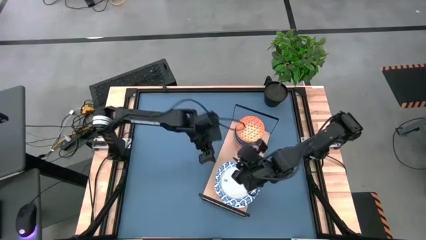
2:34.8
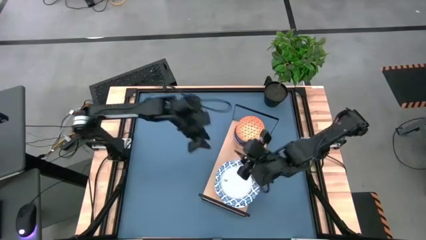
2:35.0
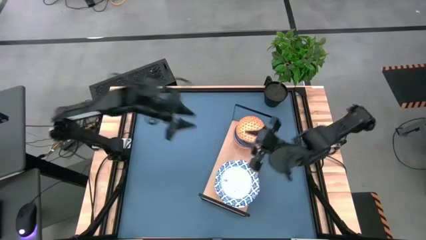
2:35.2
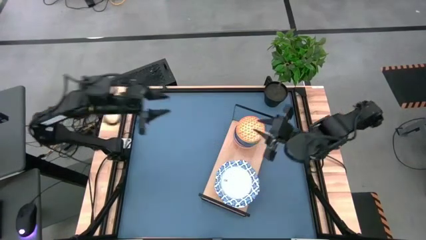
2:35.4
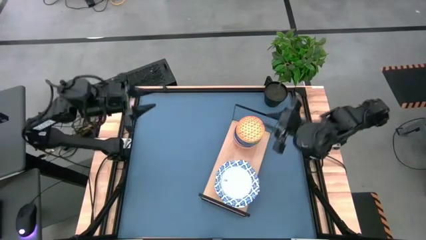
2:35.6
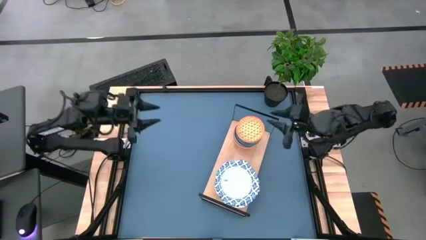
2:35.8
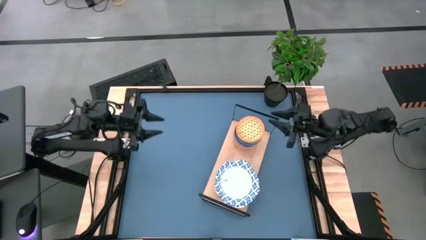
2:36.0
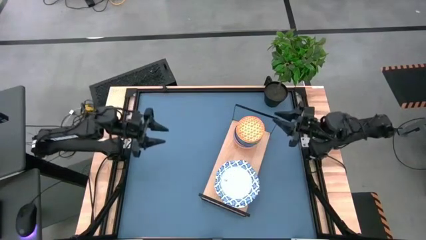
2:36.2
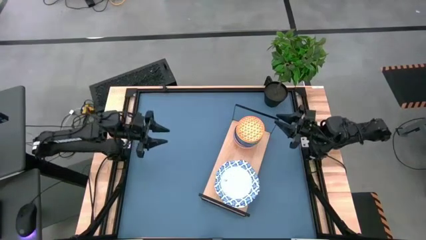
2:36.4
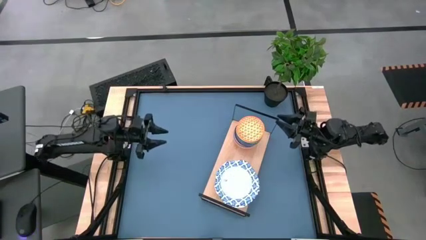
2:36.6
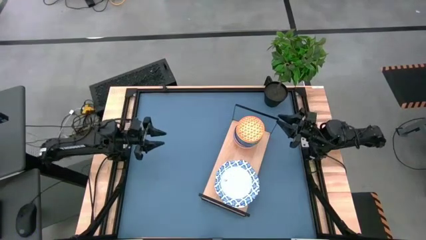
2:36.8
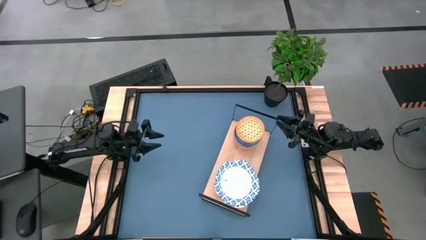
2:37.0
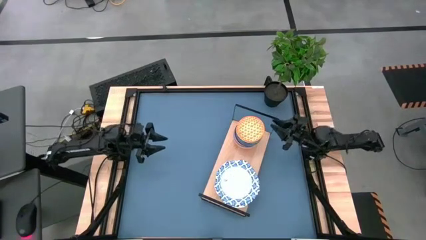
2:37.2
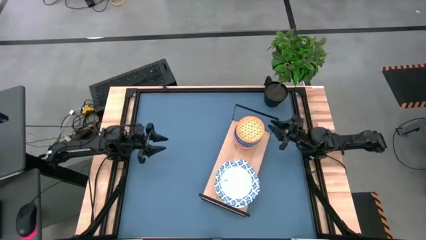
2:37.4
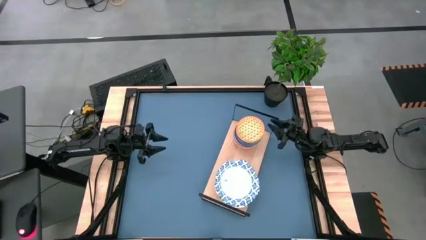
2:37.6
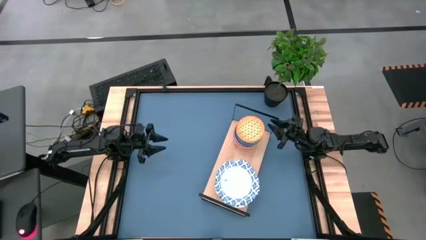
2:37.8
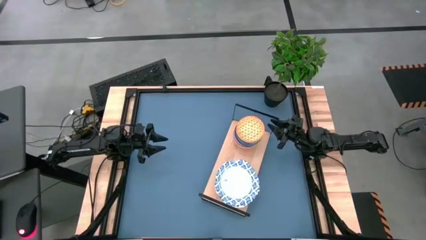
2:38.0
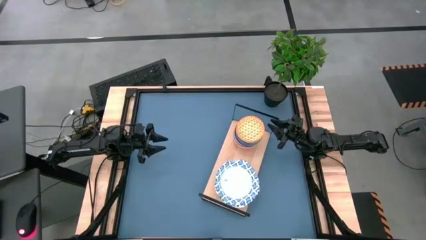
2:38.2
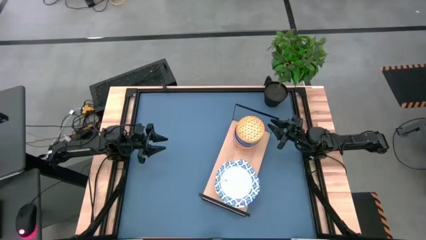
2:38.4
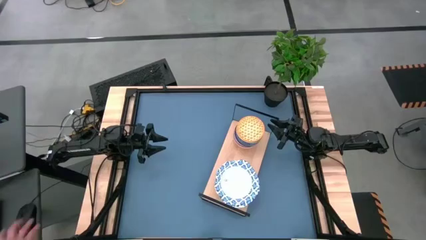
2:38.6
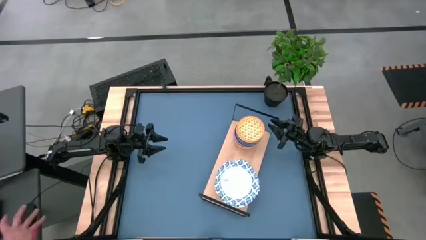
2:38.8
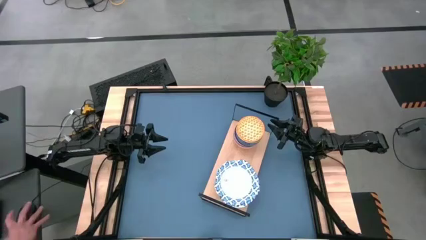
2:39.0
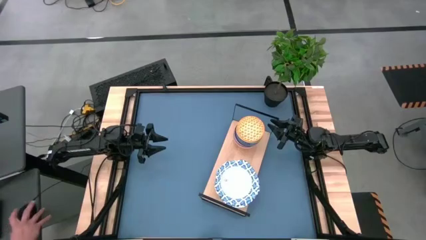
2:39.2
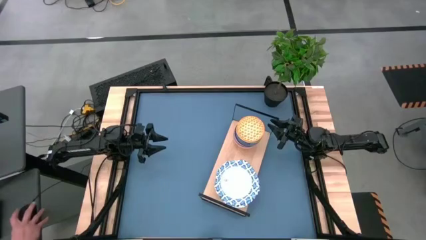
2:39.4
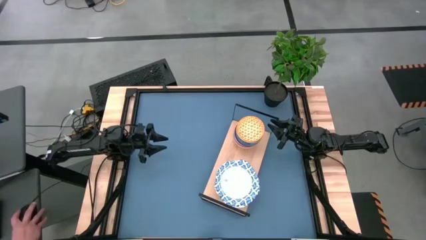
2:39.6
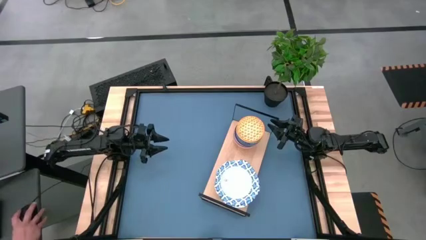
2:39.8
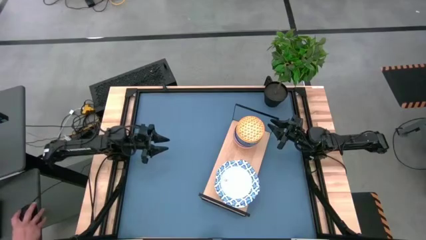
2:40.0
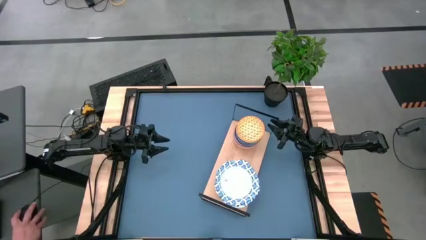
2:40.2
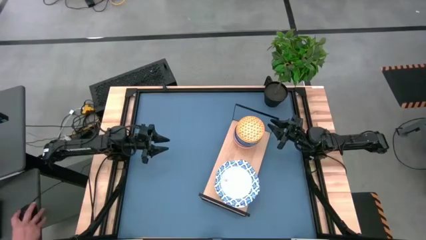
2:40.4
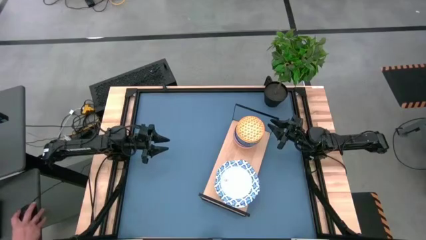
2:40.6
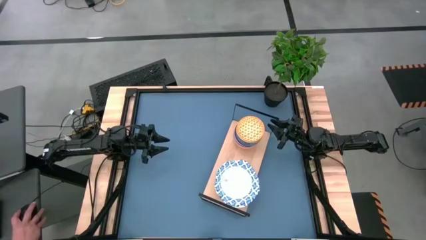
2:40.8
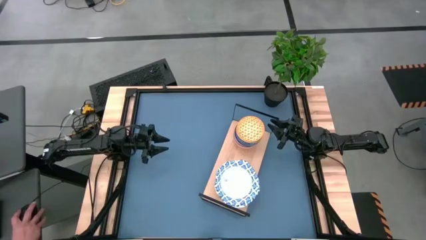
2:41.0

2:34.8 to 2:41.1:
Task: Place and stack bowls onto a shelf
Return to Home Position

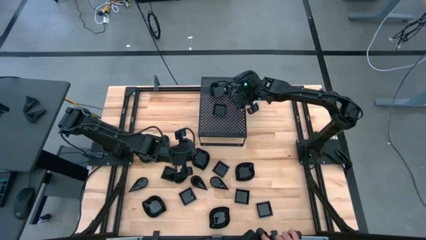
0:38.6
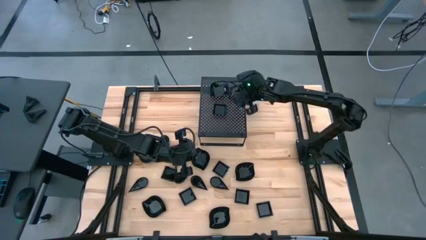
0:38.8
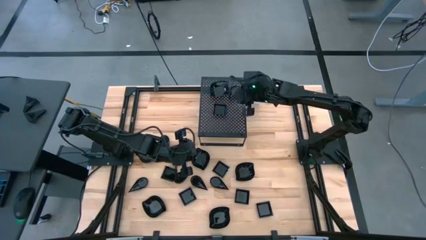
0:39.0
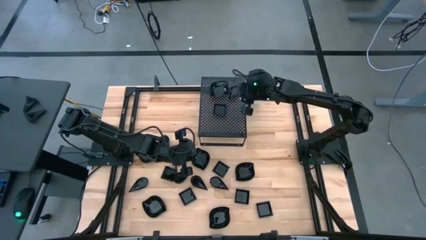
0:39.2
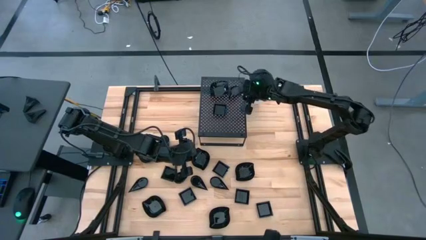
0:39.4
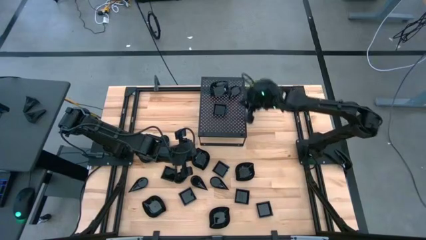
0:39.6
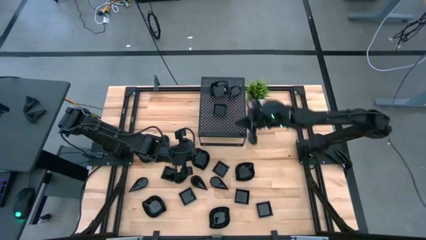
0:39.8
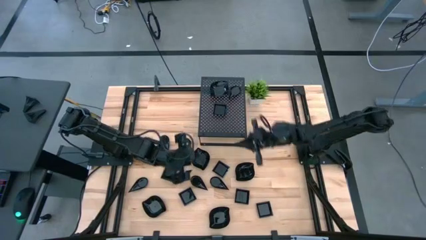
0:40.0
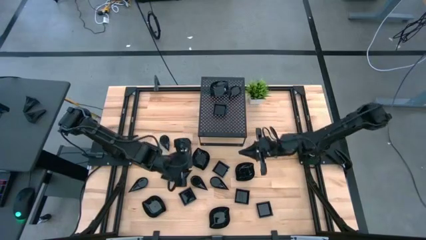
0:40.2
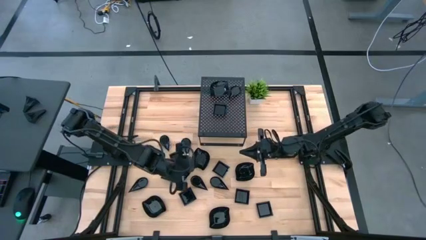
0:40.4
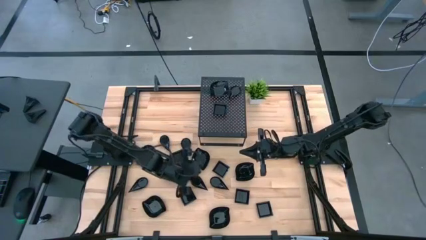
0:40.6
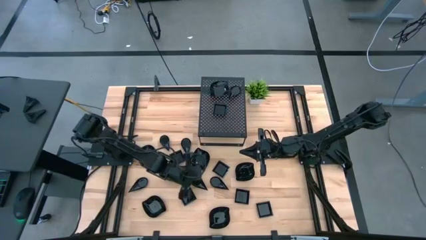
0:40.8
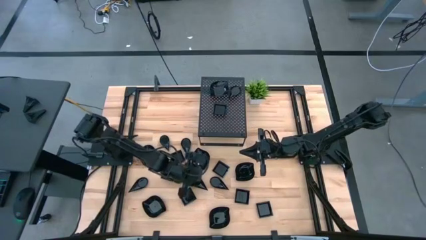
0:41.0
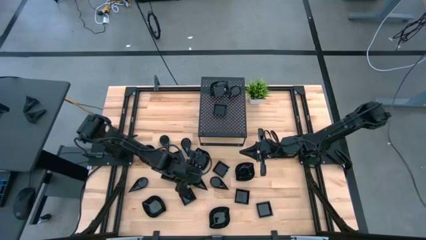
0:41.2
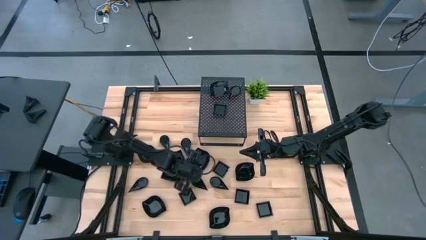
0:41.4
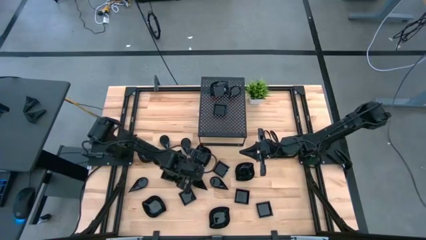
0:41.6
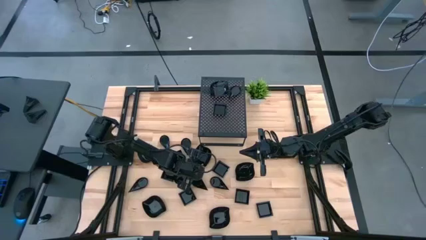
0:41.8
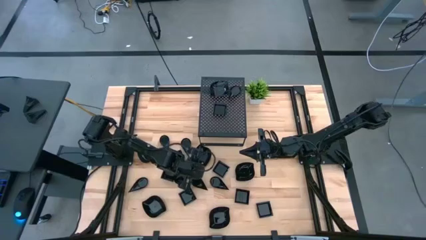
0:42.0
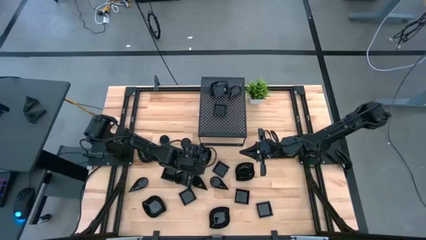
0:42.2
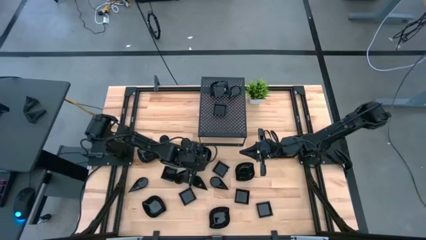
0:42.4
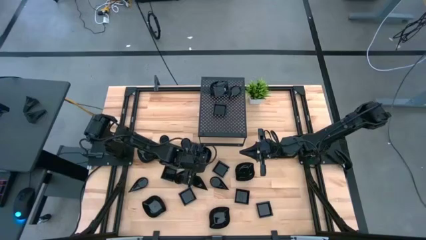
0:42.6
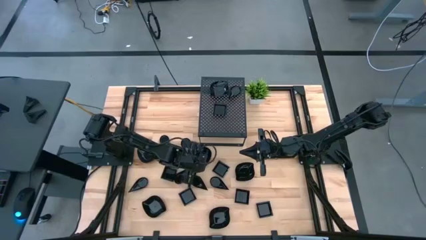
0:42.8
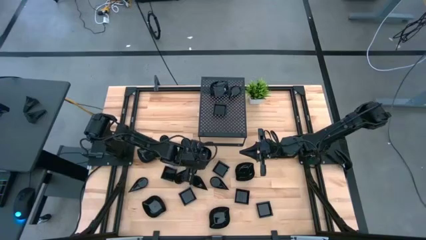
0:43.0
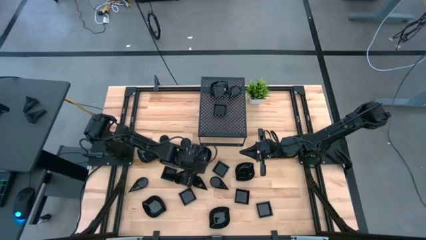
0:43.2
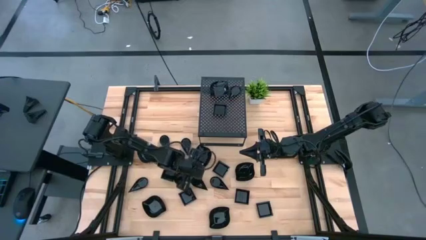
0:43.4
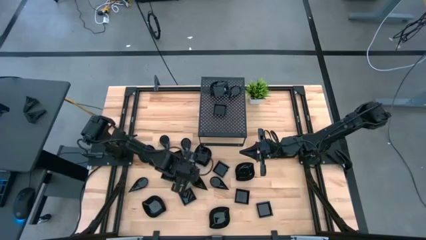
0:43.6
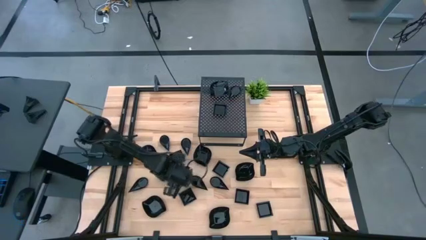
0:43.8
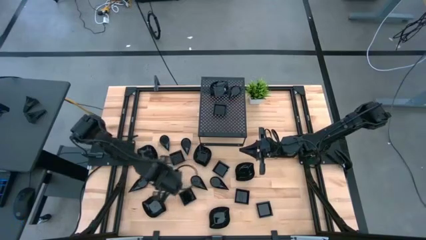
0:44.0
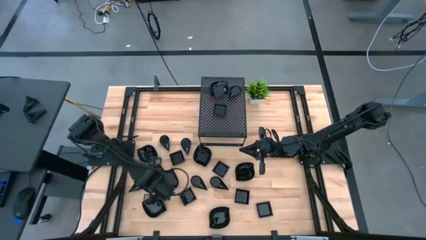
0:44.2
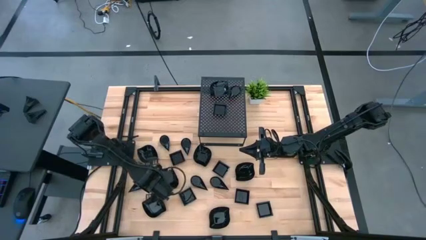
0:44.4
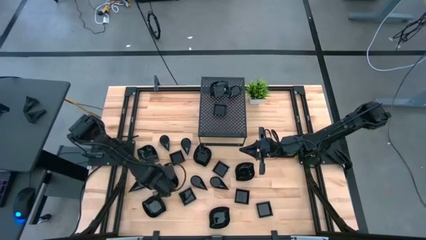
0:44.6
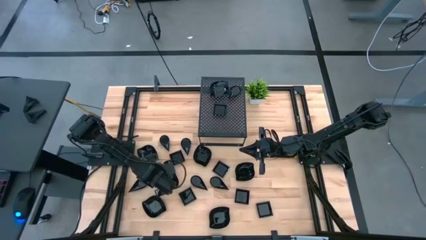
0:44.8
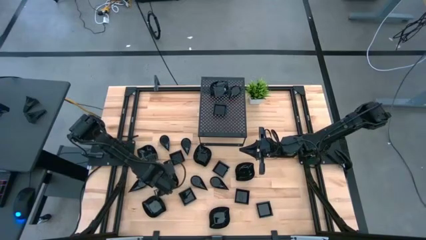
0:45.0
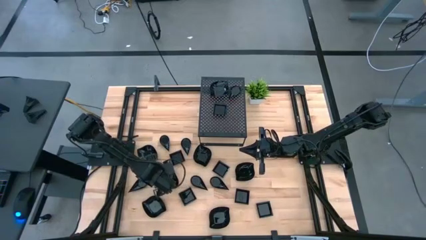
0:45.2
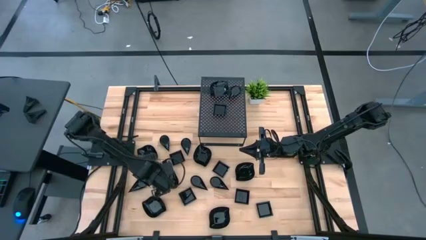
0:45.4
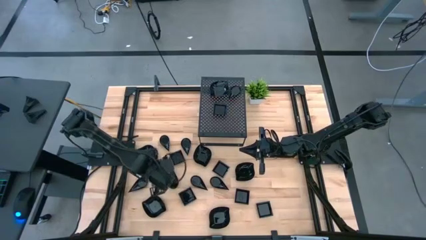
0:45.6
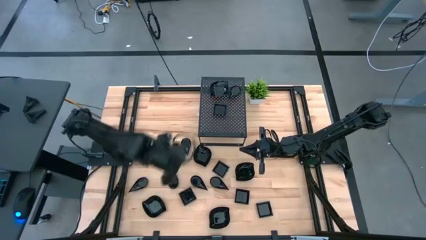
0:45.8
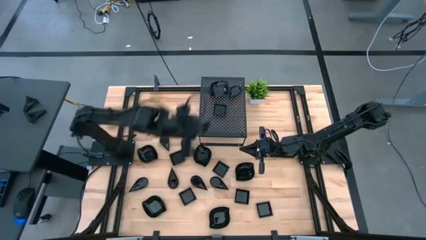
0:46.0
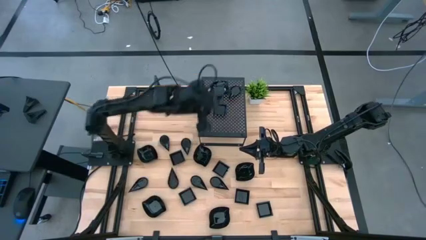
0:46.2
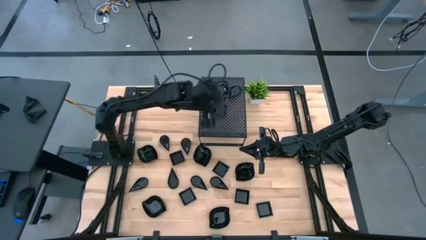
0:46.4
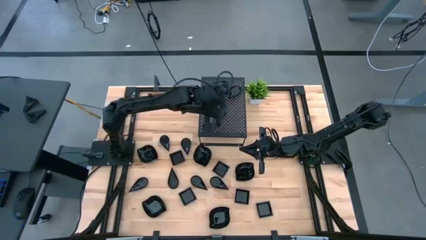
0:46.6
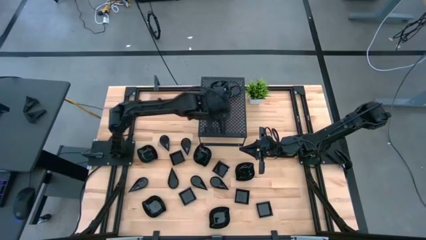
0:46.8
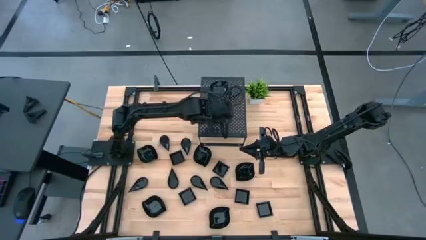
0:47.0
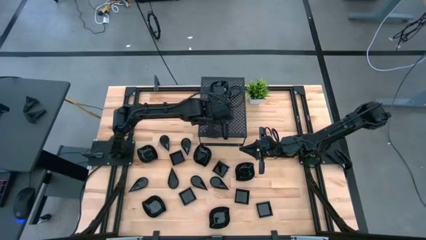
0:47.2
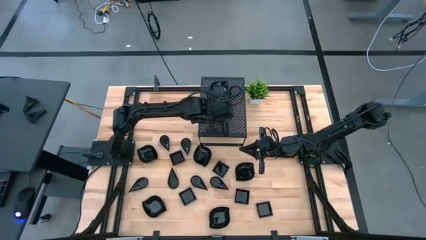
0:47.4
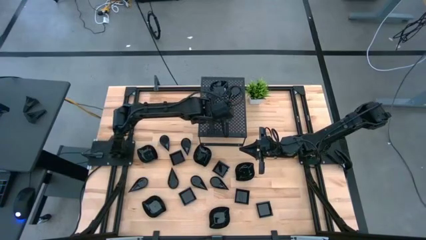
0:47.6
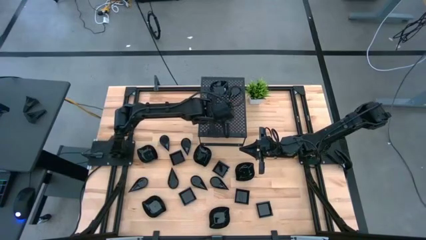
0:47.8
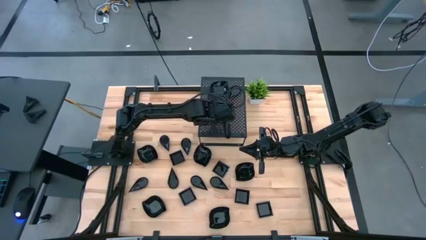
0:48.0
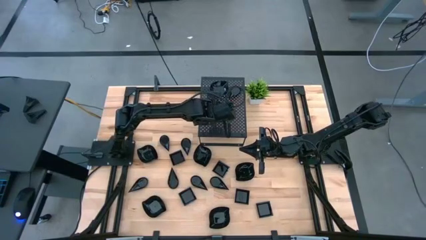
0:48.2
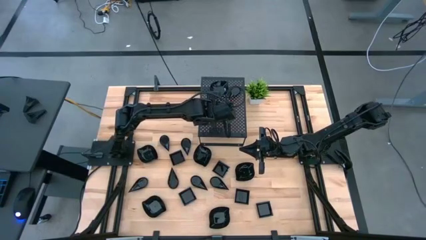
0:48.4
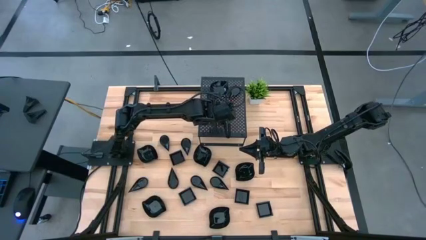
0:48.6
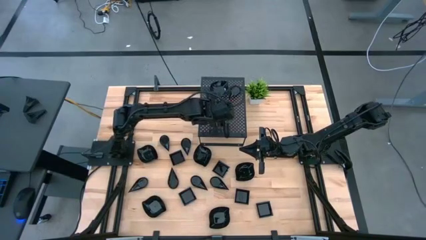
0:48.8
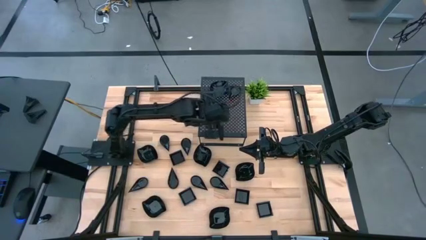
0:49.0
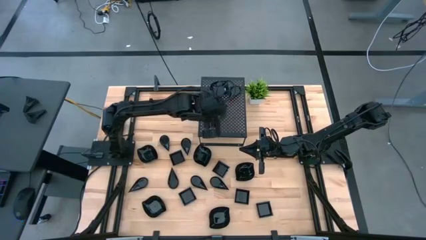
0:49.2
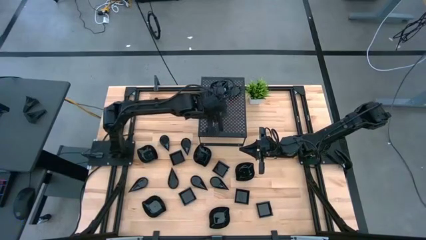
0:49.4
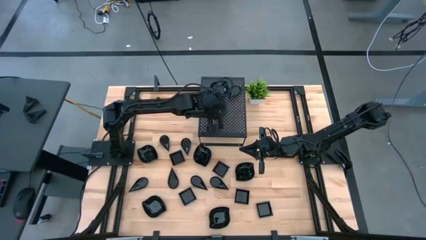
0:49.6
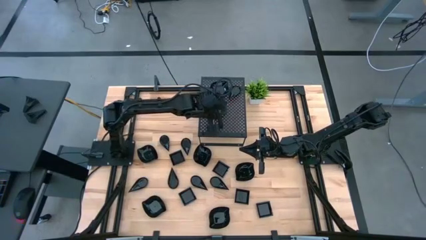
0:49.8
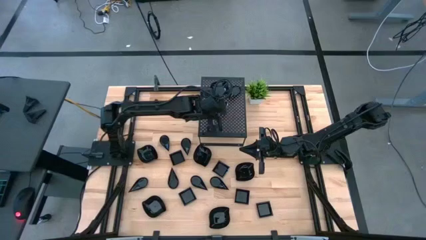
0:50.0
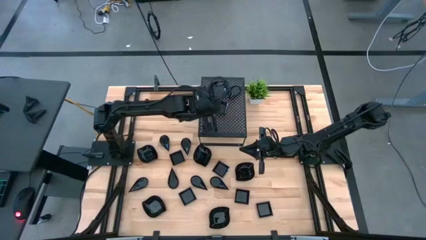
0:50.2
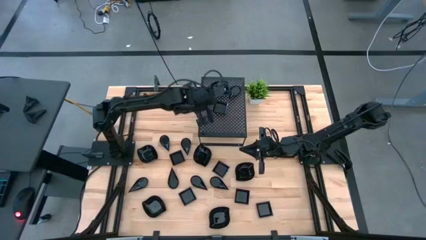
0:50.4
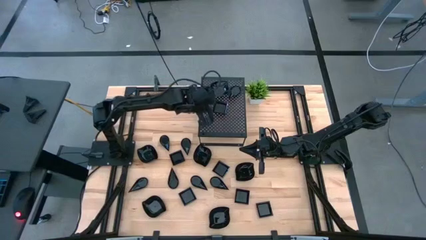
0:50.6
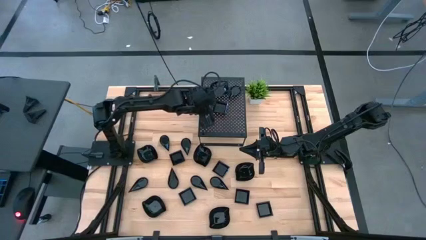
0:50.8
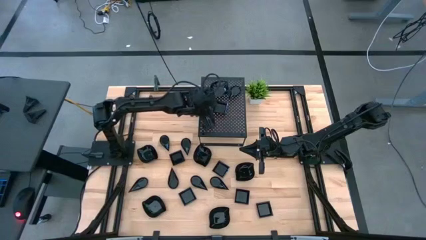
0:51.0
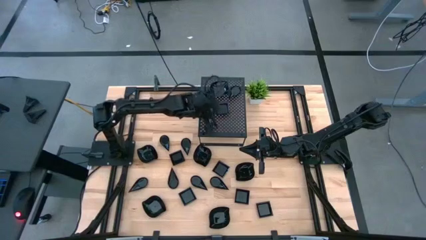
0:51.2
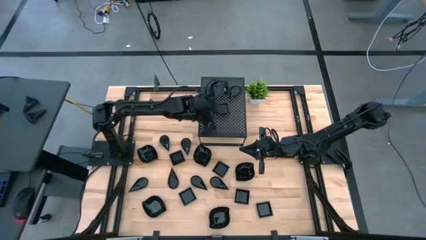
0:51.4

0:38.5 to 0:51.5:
Task: Pick & Place Mini shaped plates
Stack the black square plate on top of the black square plate on the shelf
